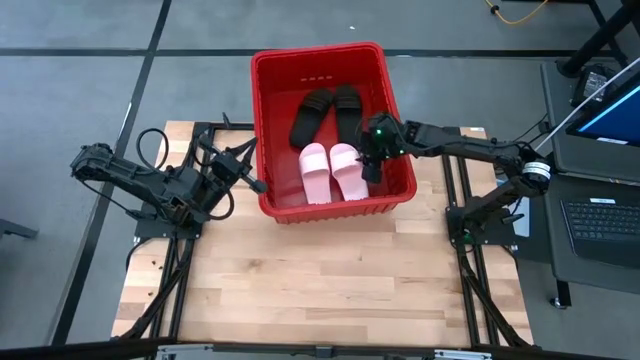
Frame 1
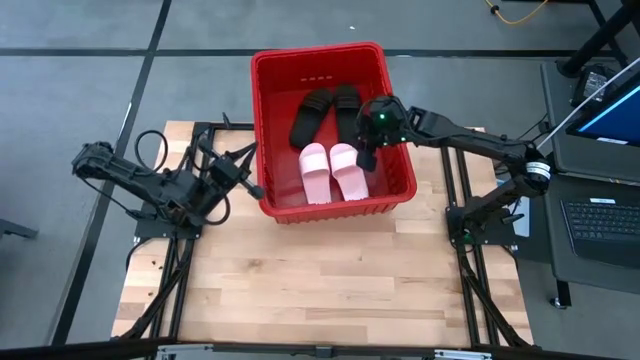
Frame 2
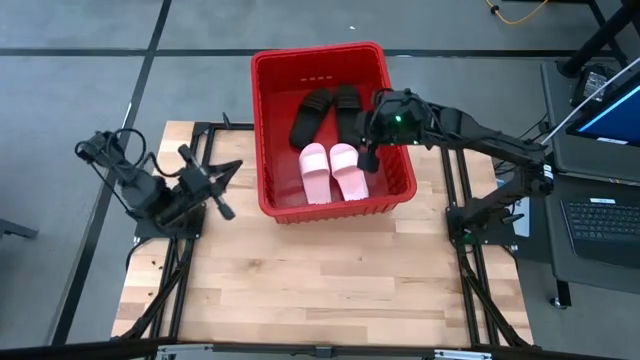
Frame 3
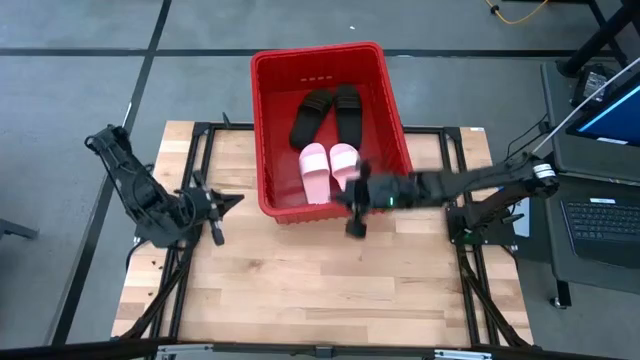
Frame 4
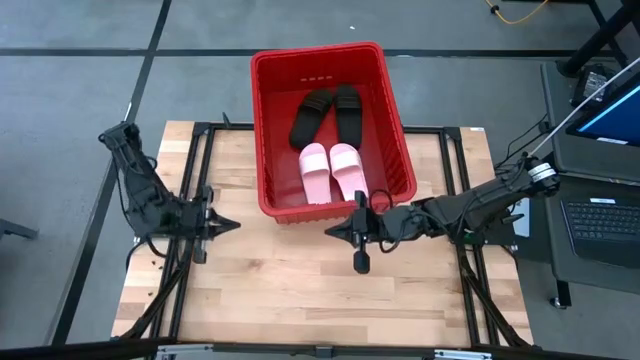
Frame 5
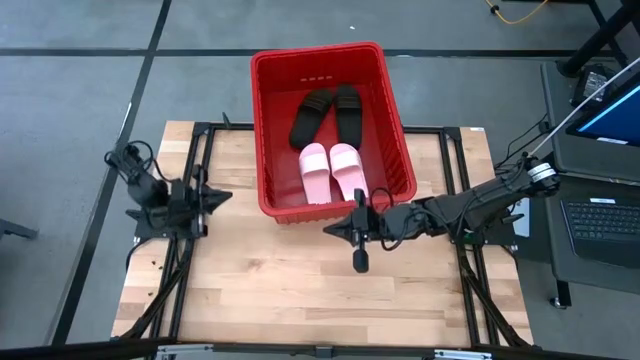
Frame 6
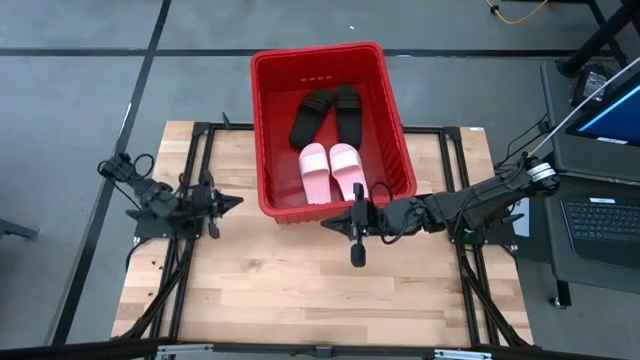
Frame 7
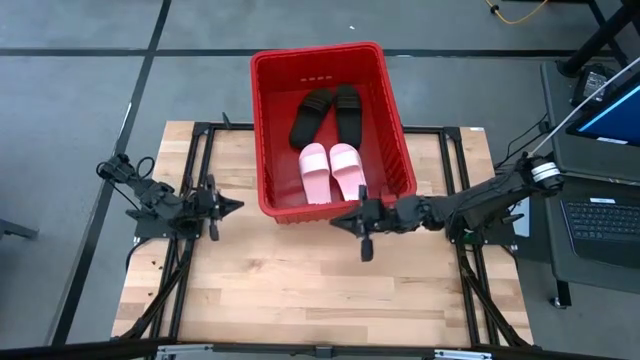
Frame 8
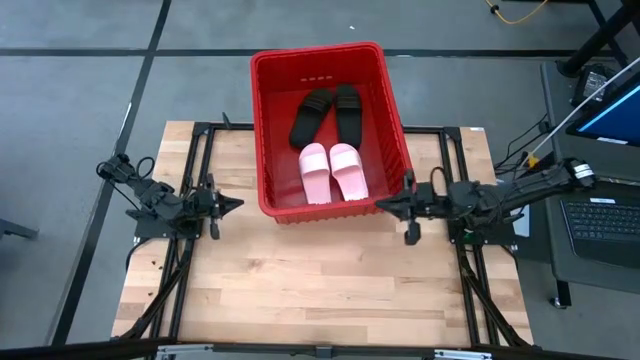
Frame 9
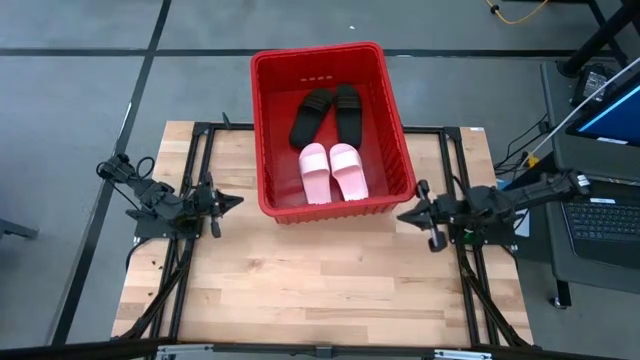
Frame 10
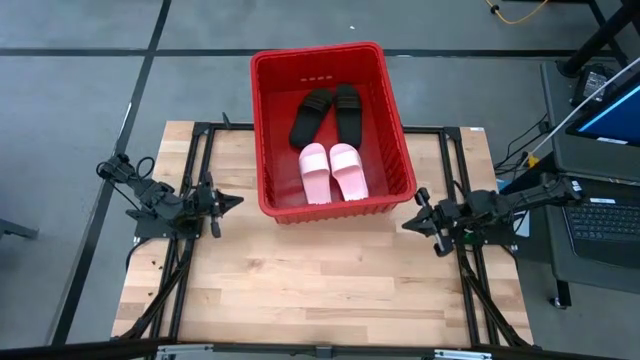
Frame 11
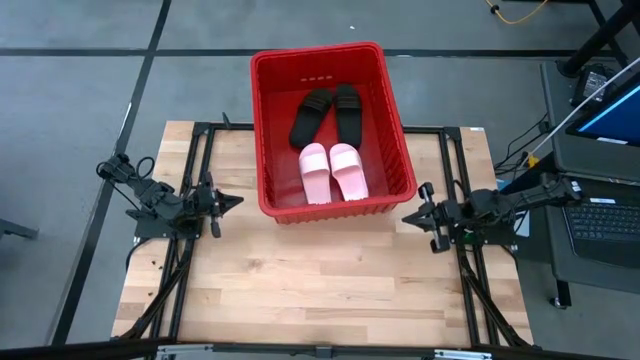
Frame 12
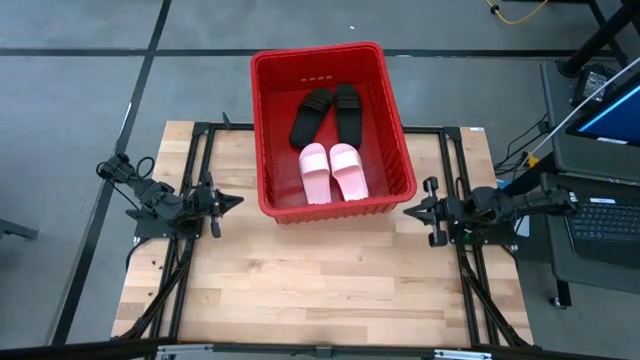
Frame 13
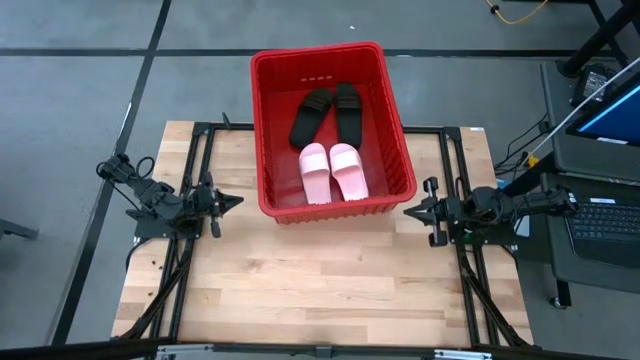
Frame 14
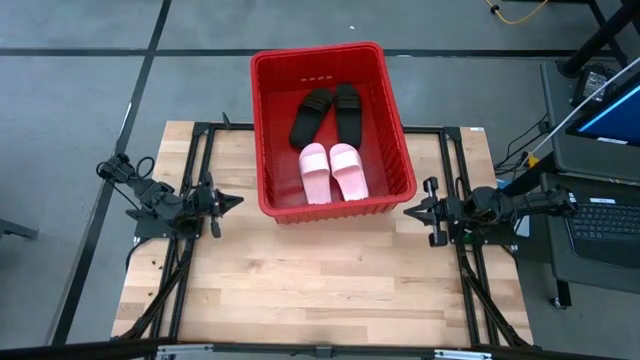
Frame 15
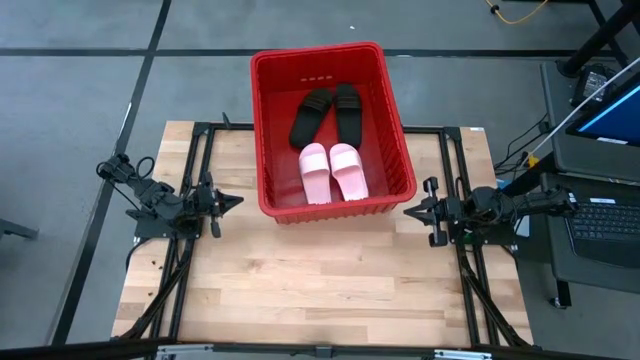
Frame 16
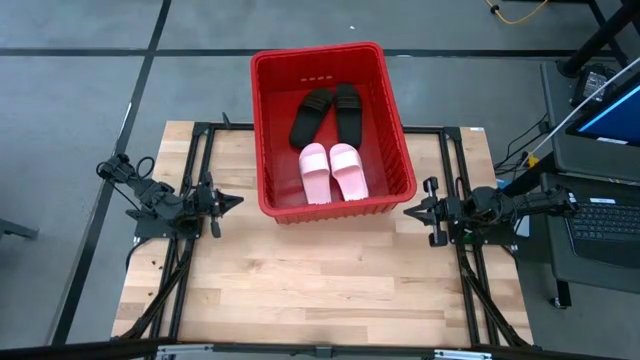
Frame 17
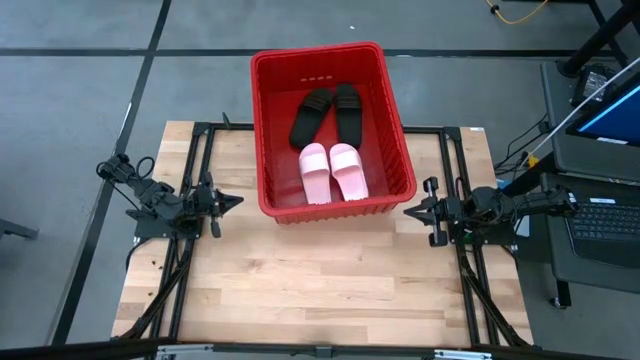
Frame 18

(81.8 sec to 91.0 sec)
Task: Pick and place slides into bin
Return to Home Position

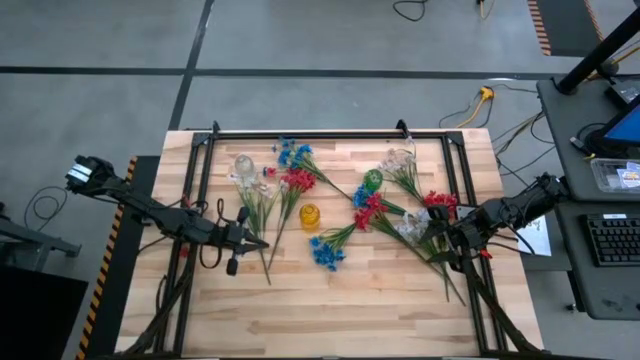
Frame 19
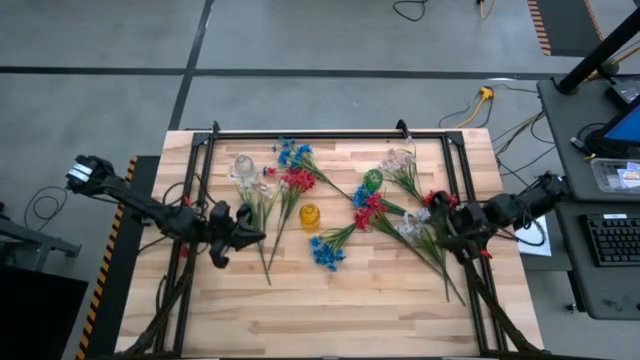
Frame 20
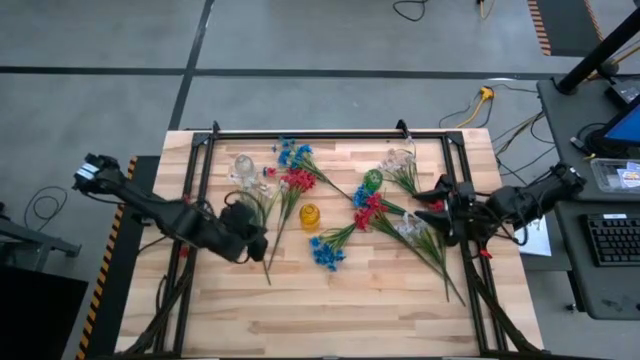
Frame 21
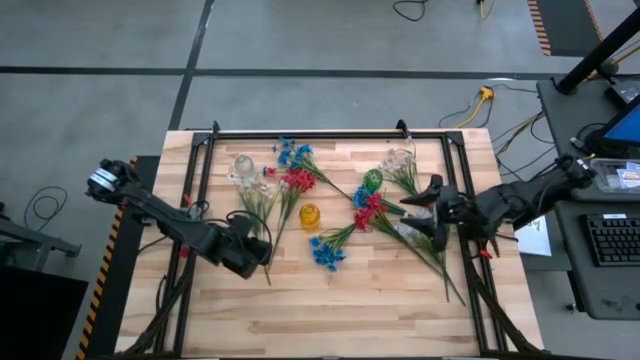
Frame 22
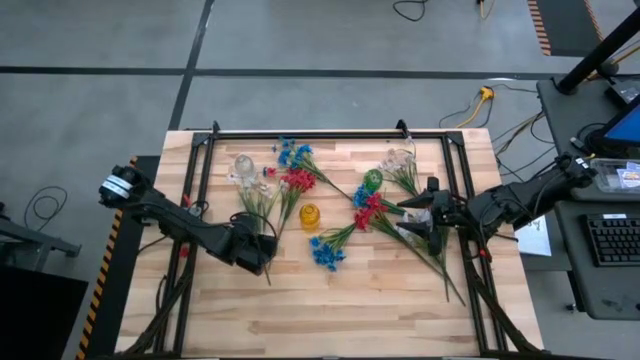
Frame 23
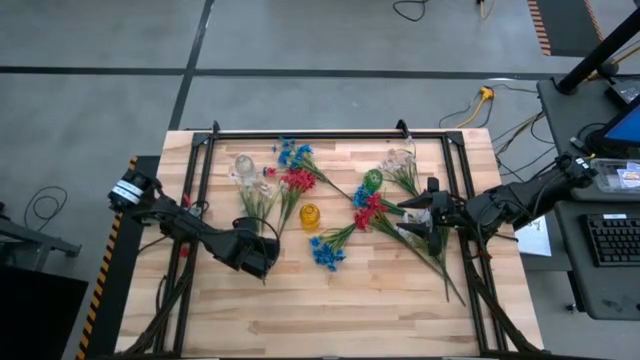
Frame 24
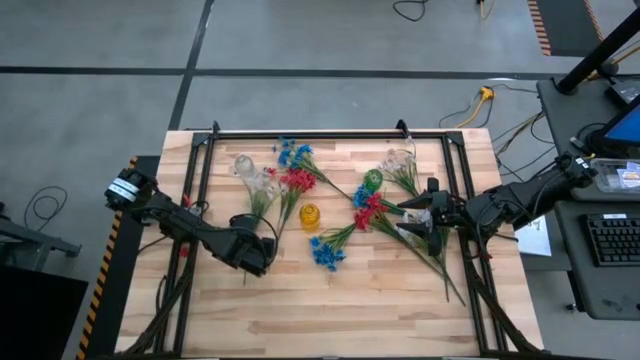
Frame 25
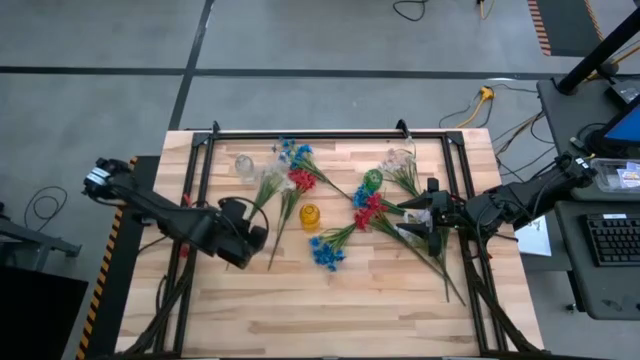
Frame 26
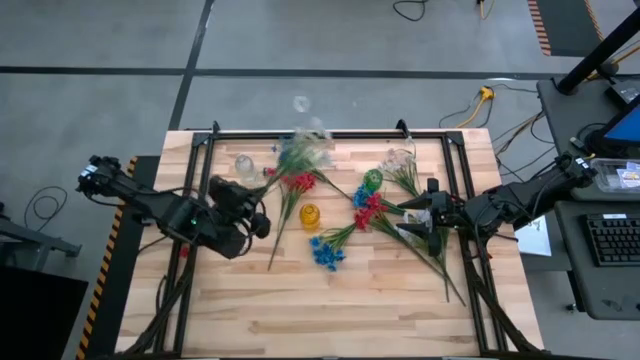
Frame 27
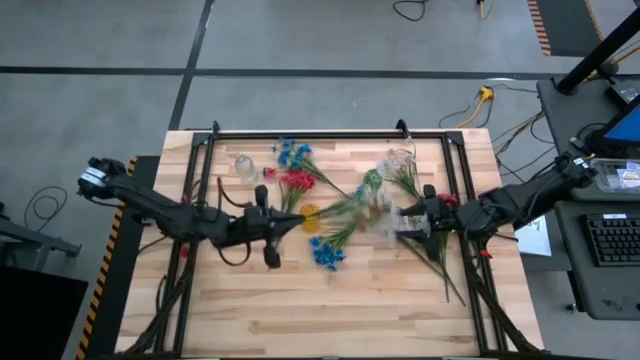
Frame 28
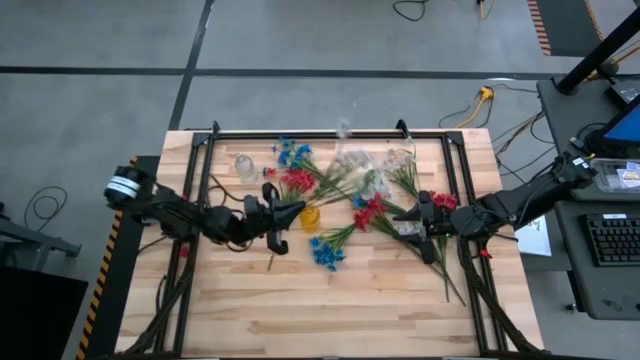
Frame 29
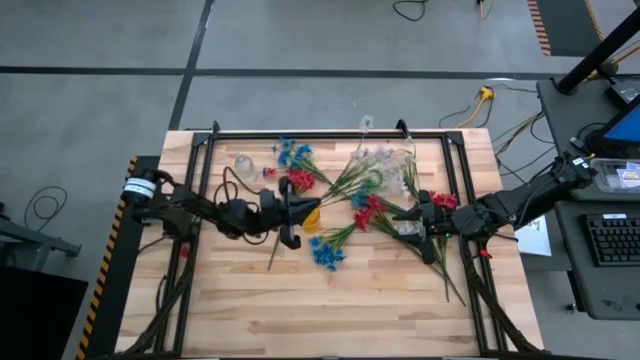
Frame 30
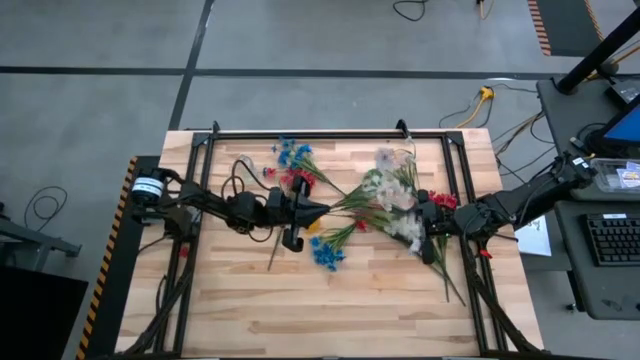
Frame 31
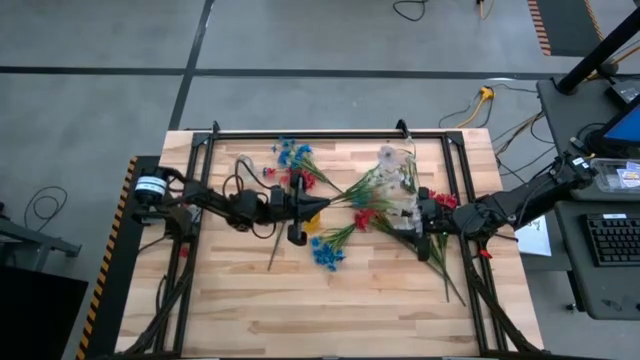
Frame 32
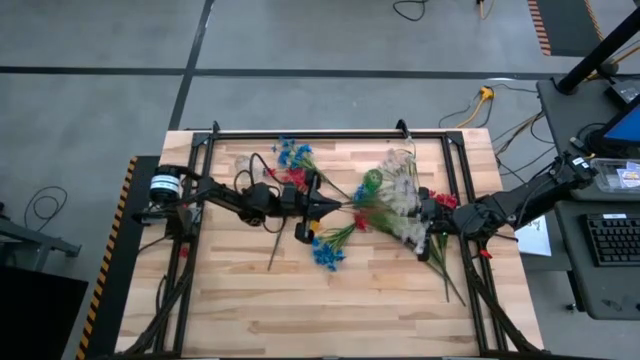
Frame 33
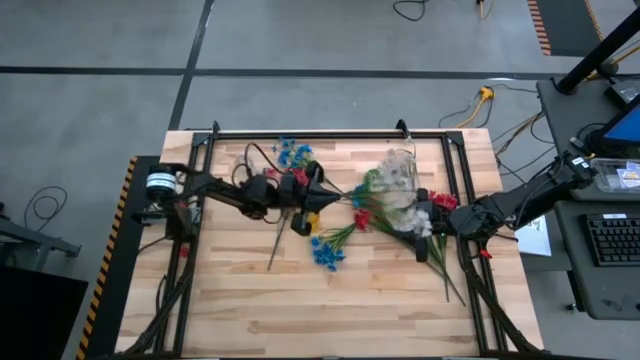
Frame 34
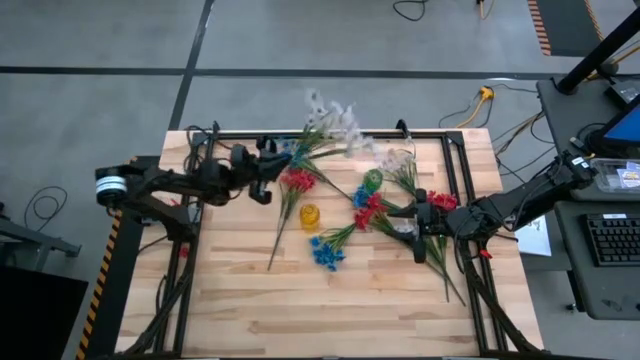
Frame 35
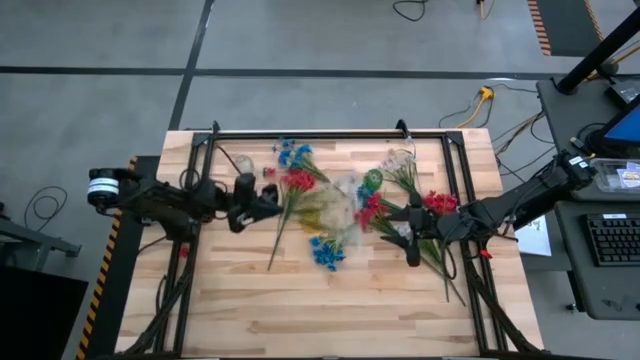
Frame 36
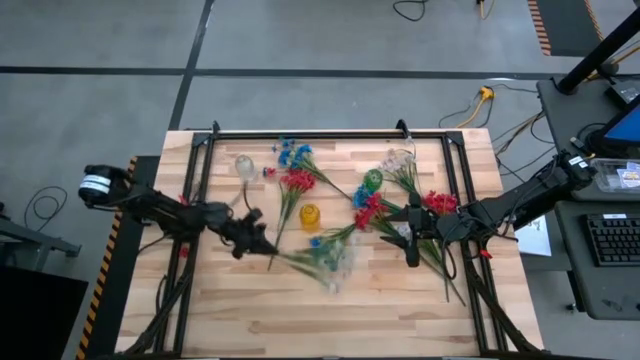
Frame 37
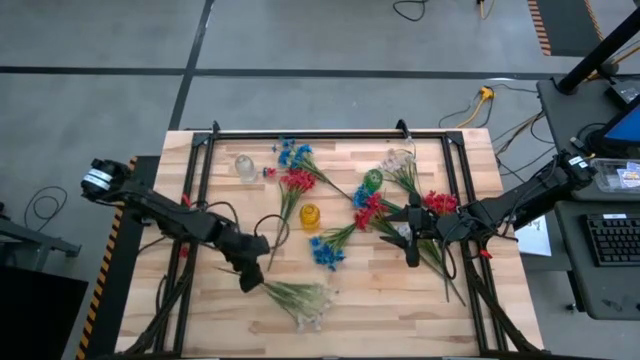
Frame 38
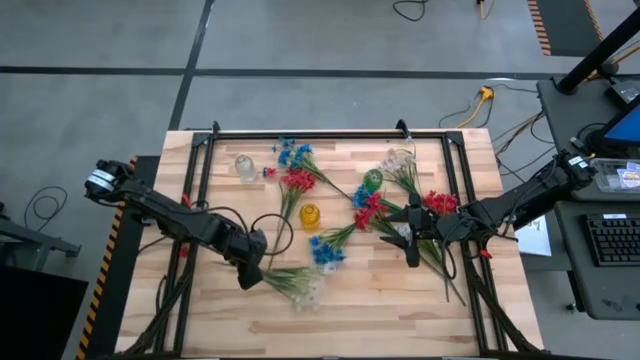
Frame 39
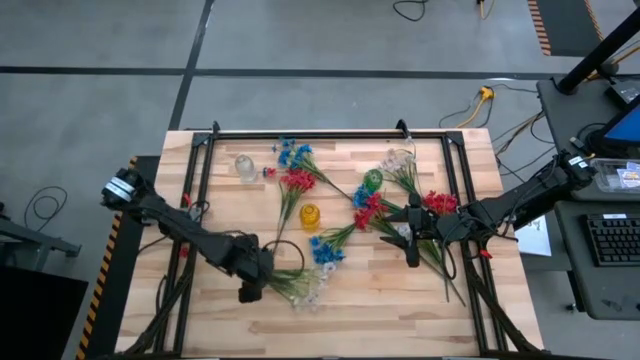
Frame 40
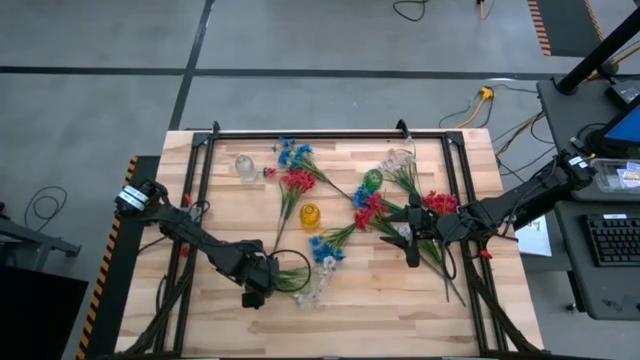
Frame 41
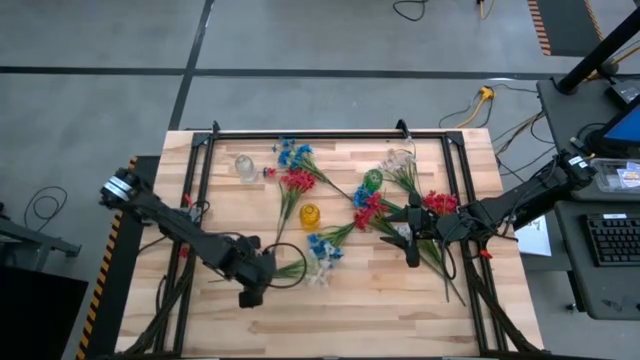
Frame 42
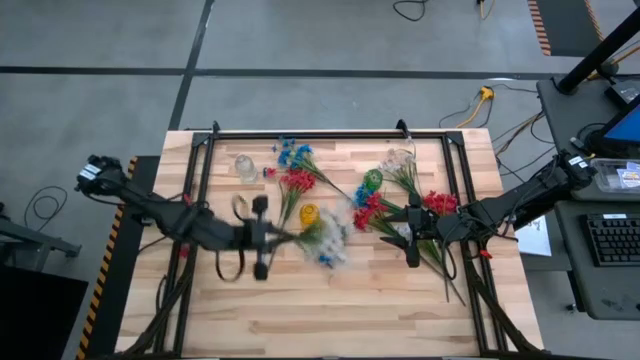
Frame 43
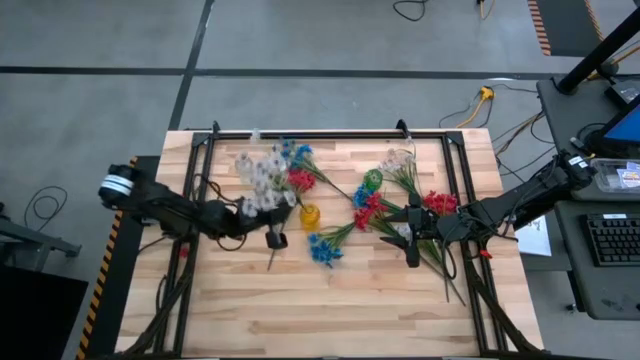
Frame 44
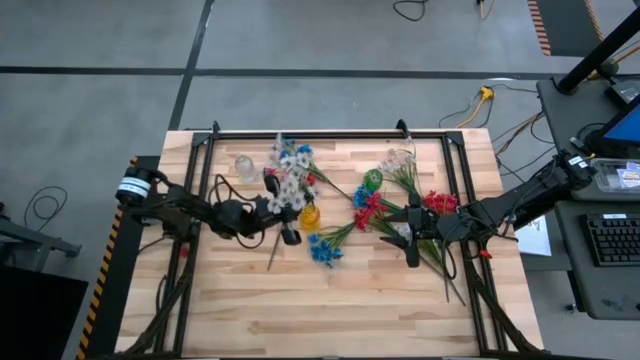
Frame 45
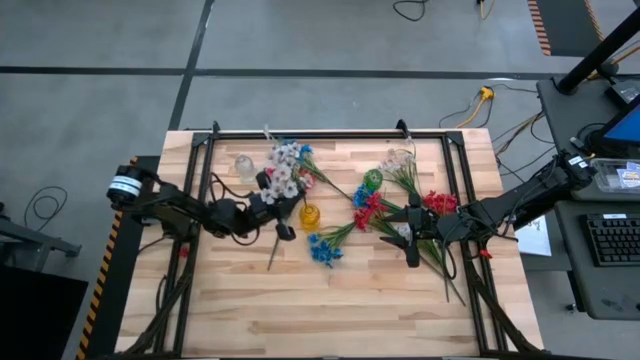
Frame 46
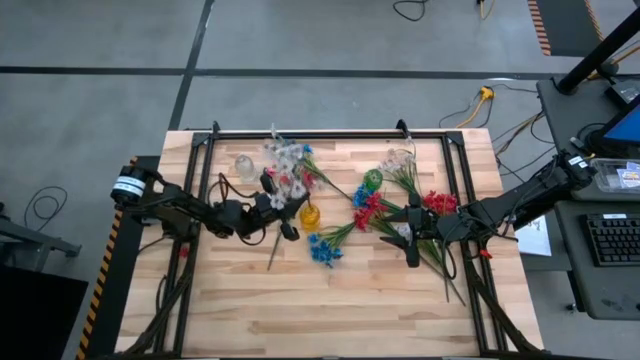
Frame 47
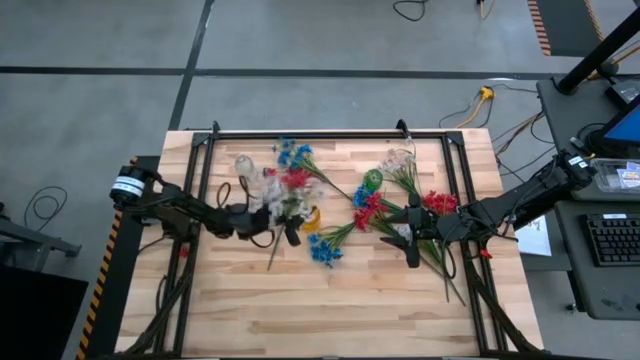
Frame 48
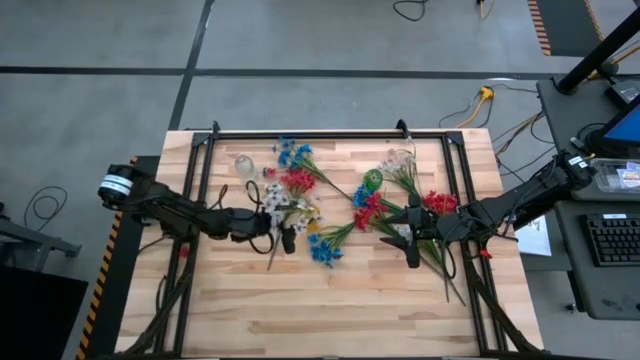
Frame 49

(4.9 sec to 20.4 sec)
Task: Sort flowers into vase by color
Put the bottom left white flowers into the yellow vase
